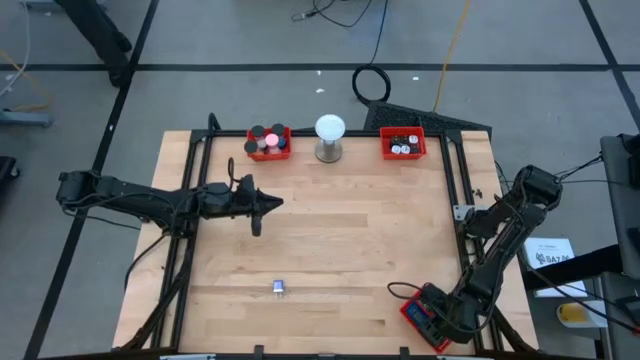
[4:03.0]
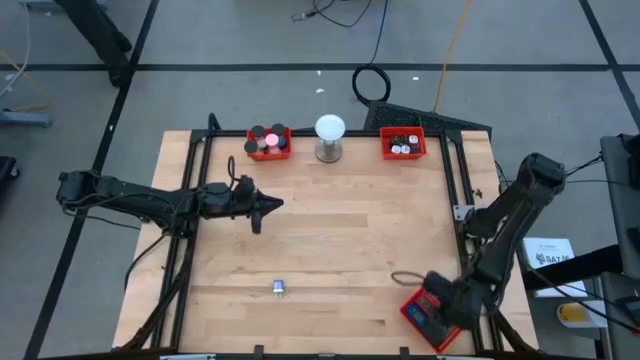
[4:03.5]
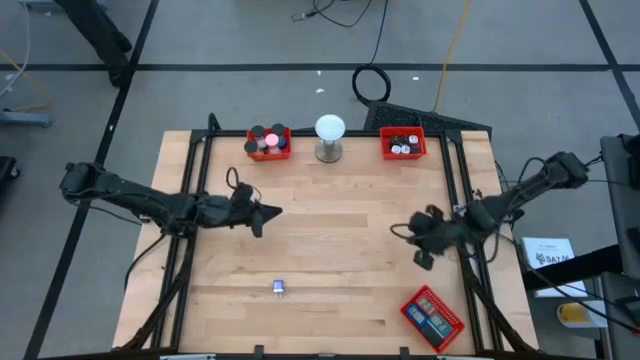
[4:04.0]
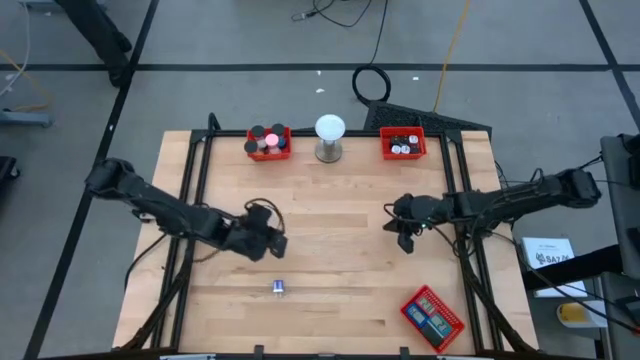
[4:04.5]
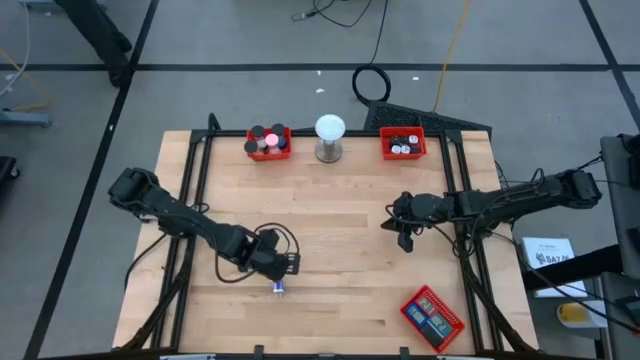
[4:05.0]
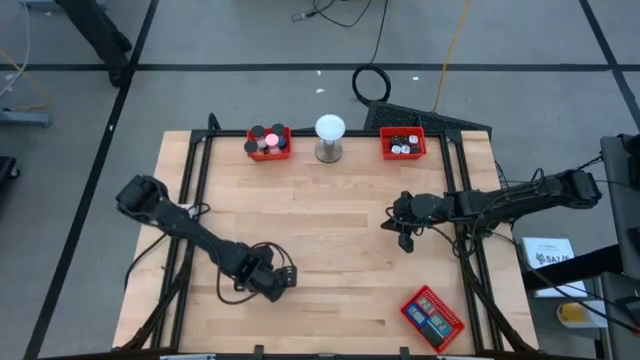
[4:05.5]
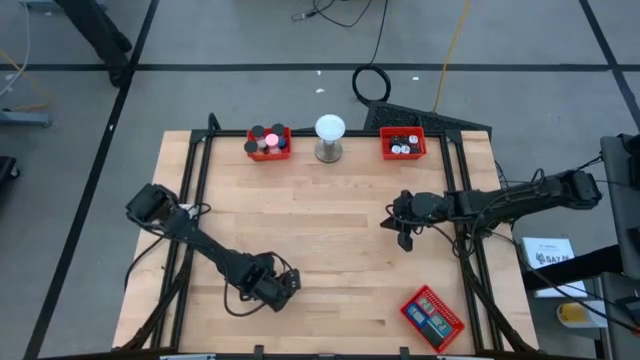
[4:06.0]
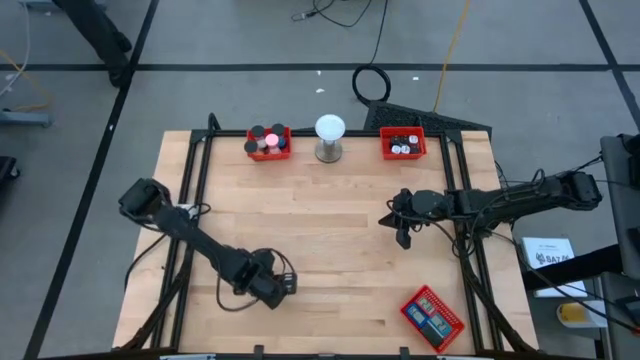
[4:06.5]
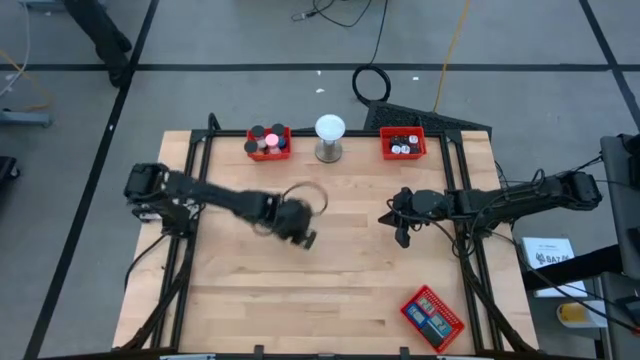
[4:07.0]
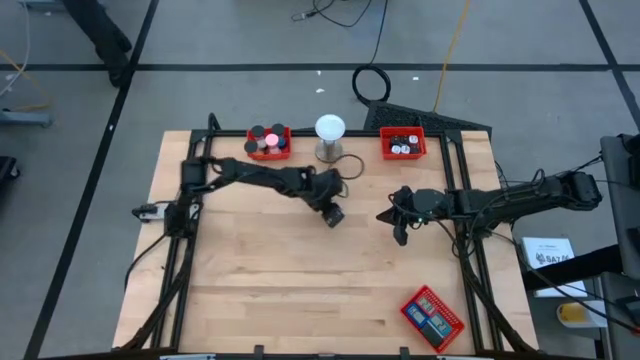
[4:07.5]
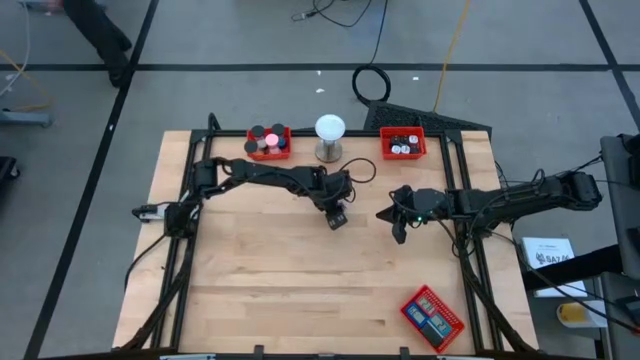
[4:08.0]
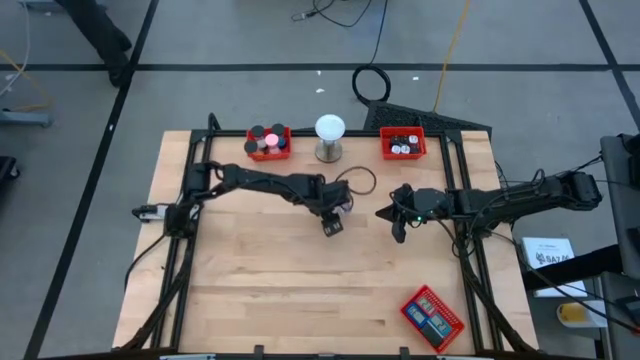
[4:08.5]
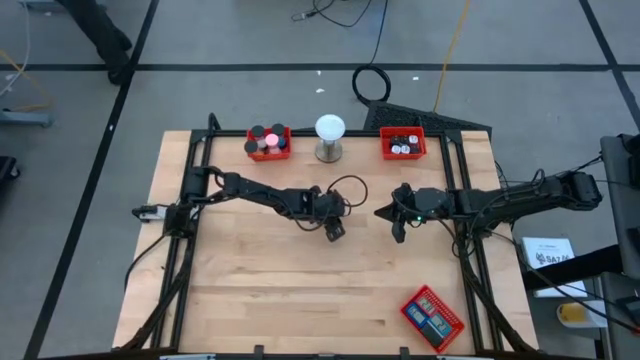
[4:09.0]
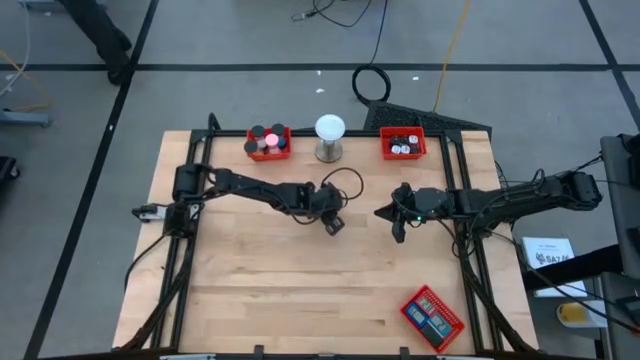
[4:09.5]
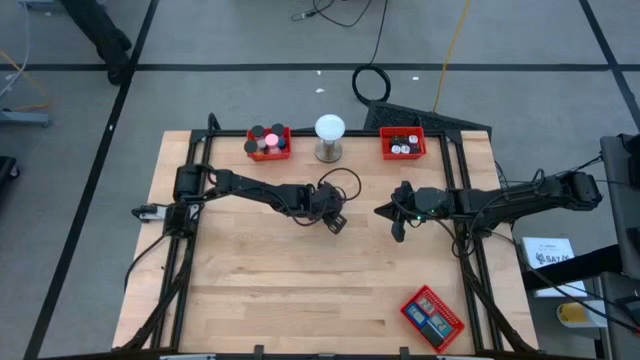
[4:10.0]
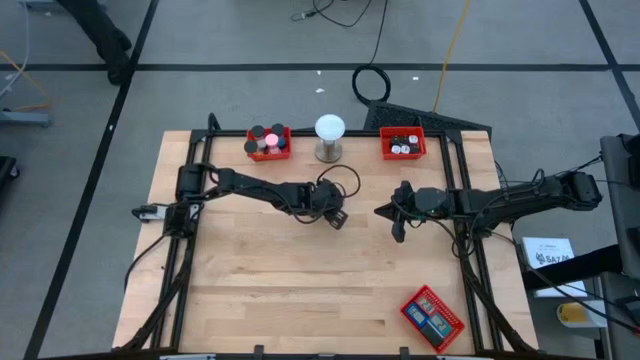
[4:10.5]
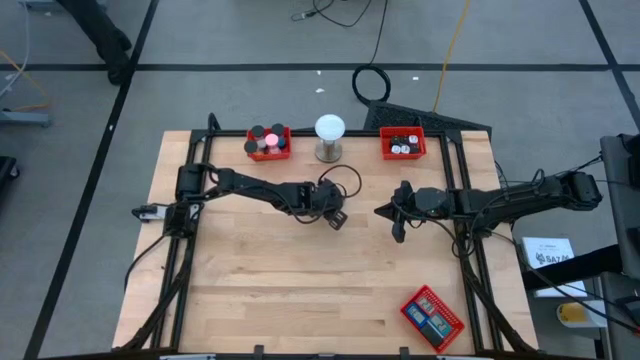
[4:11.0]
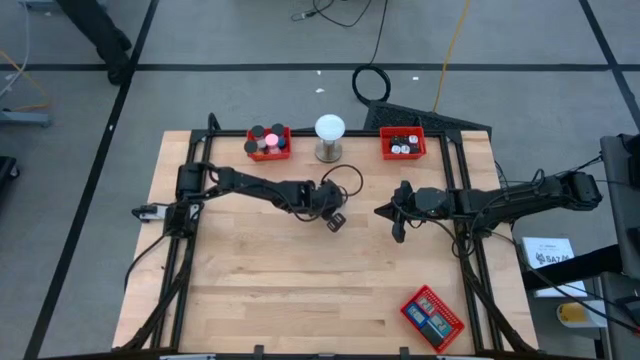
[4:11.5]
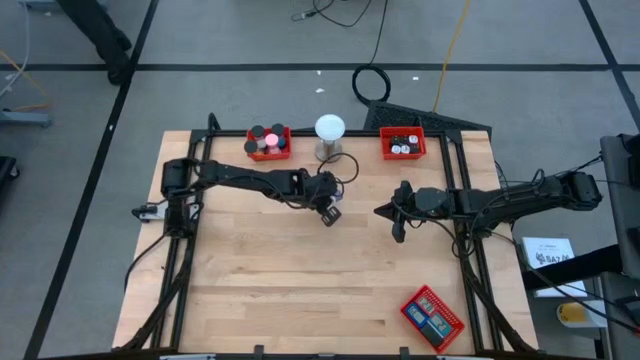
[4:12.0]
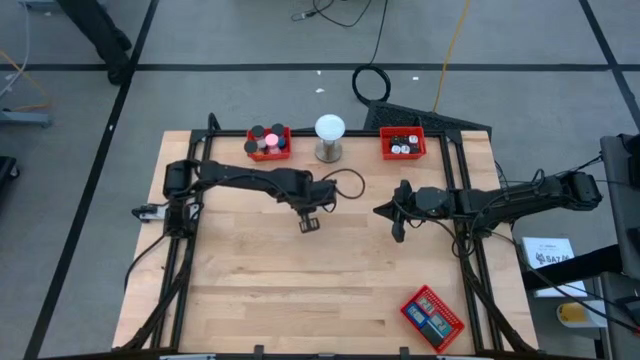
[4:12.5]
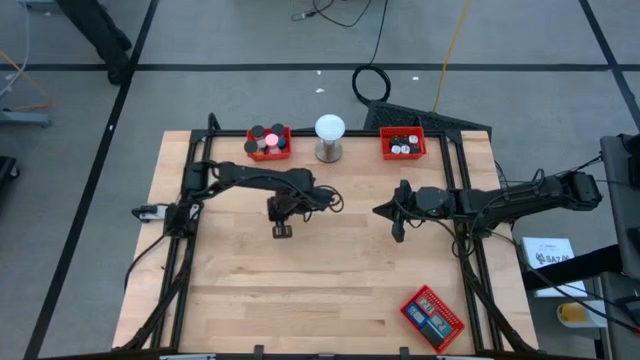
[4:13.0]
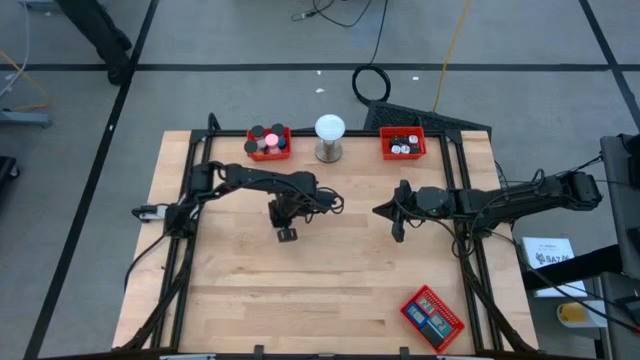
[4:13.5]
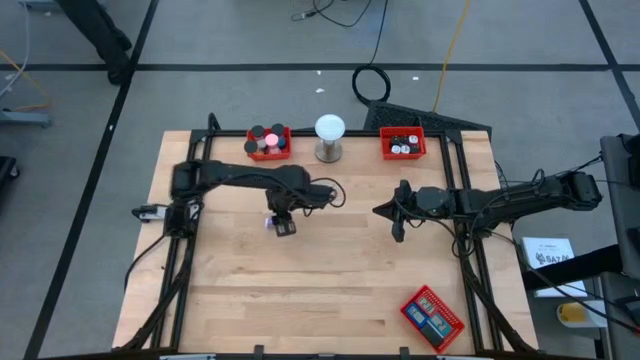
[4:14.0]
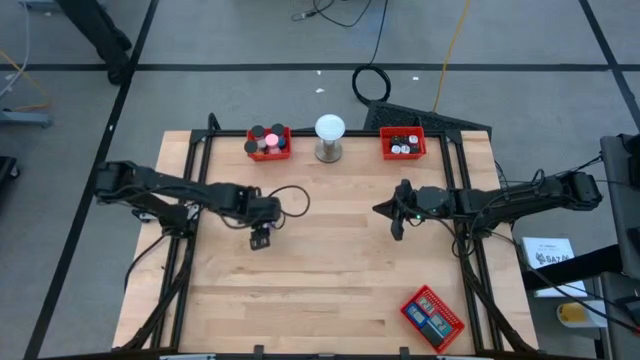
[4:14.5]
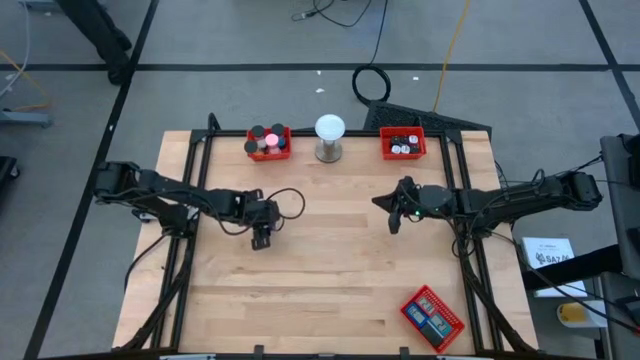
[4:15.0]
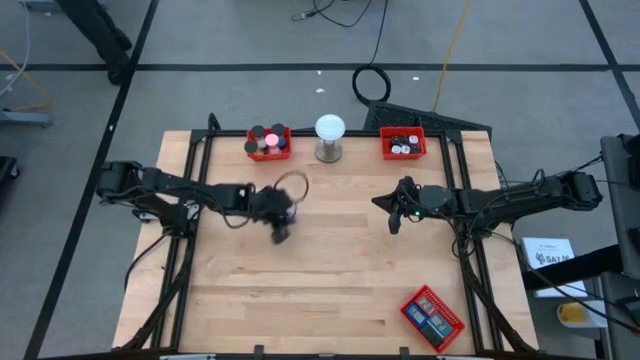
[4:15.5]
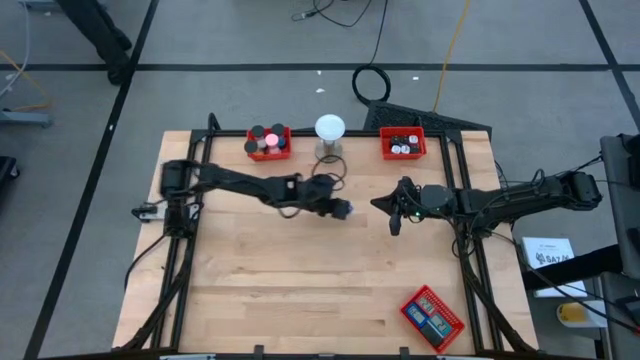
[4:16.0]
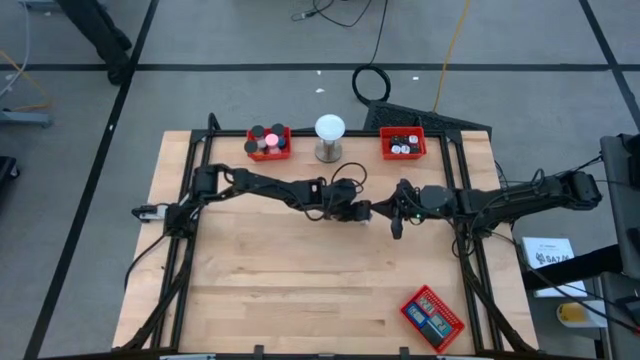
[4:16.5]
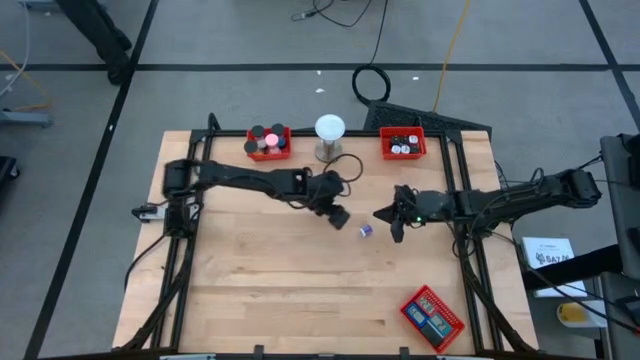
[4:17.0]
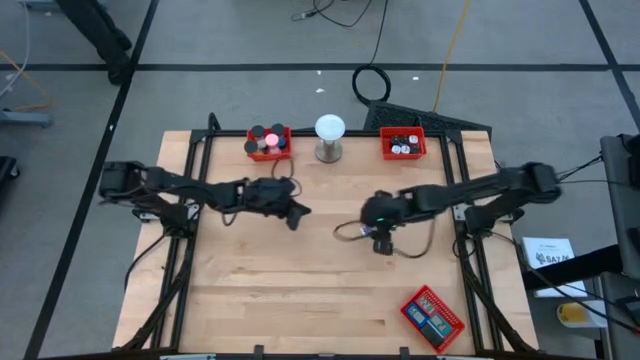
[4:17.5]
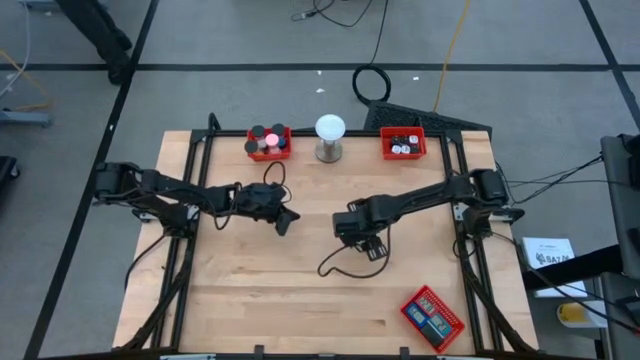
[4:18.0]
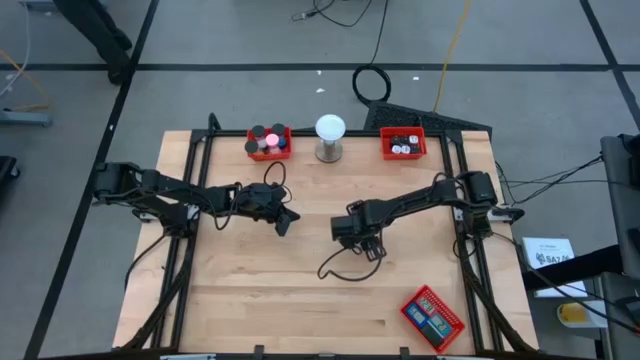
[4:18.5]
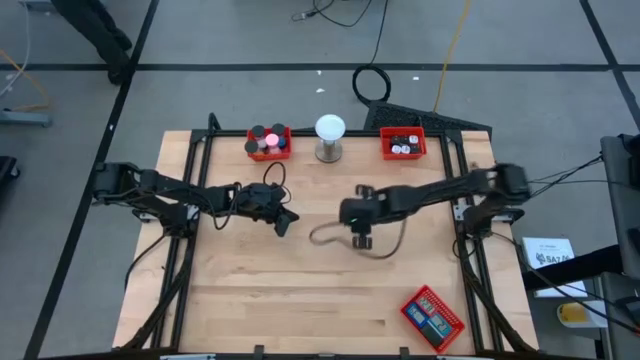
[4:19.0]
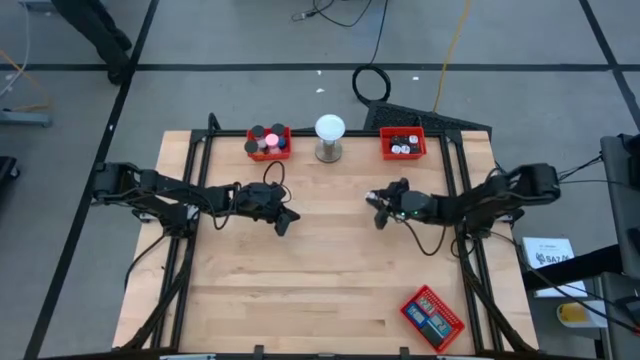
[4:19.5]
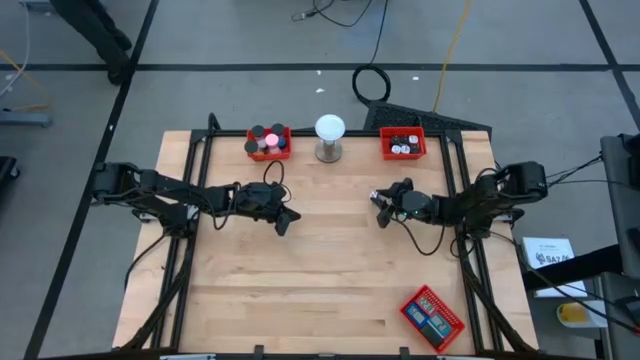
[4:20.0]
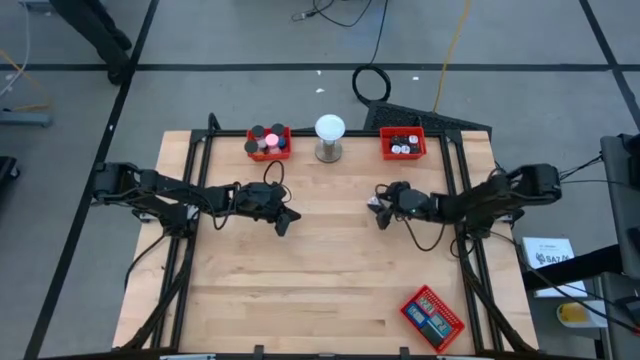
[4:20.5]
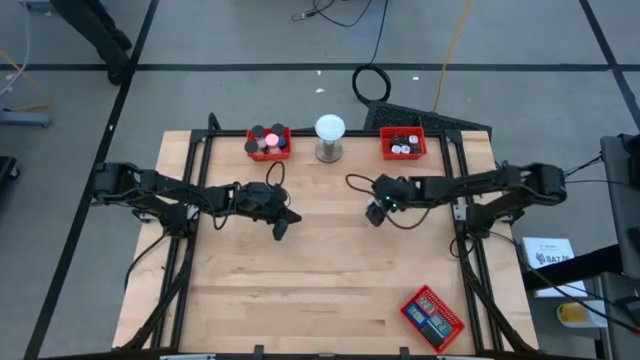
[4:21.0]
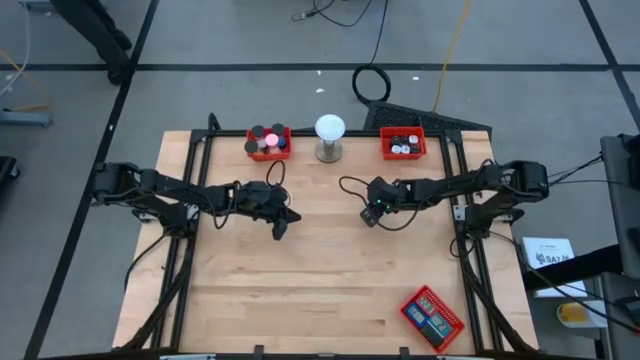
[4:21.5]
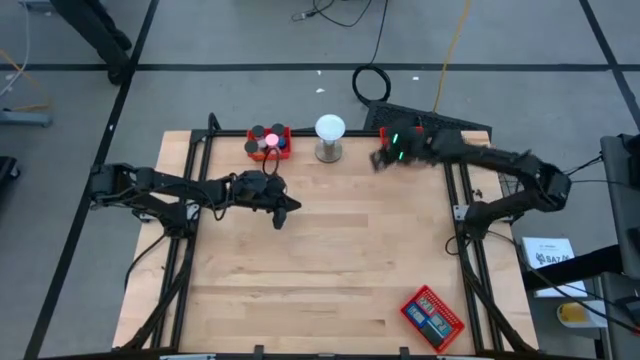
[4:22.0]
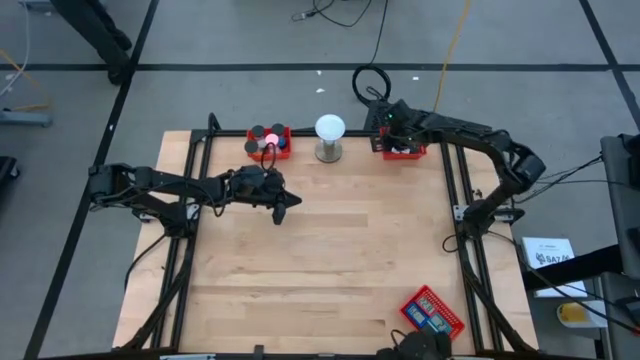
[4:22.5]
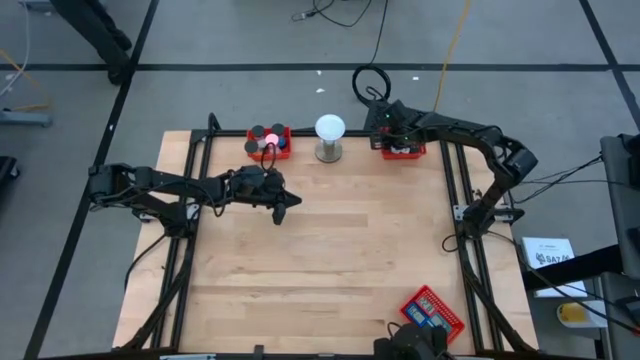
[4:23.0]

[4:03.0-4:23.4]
Task: Pick & Place Office items
Put the blue charger adapter into the top right red bin
